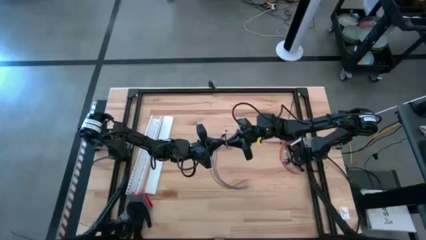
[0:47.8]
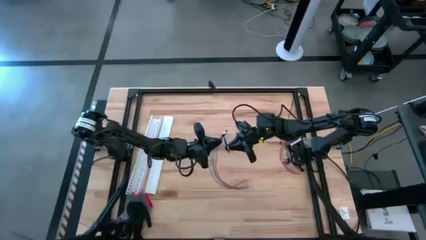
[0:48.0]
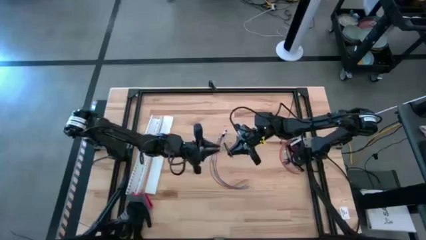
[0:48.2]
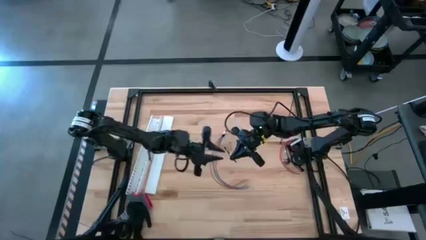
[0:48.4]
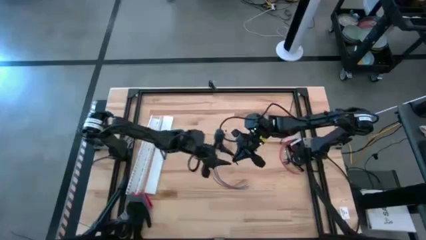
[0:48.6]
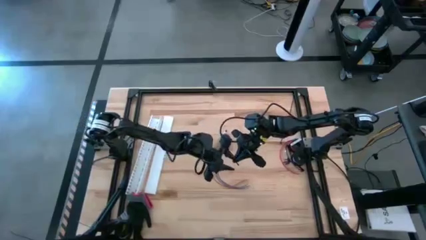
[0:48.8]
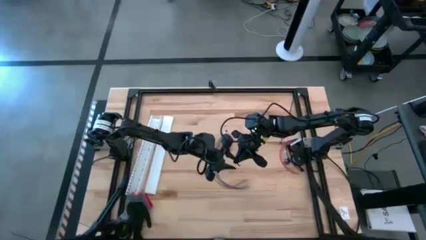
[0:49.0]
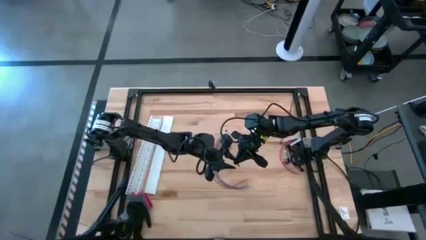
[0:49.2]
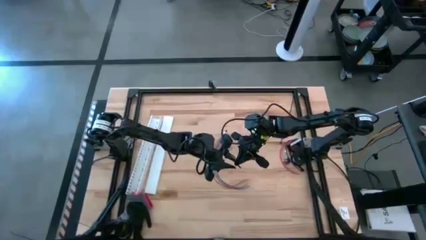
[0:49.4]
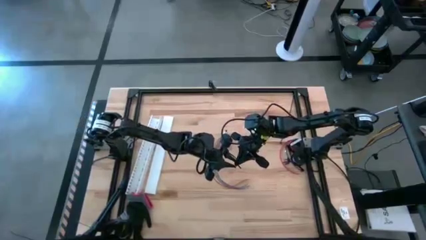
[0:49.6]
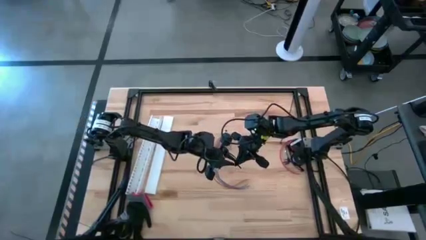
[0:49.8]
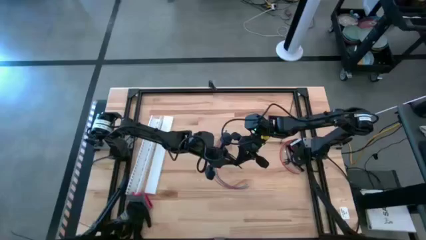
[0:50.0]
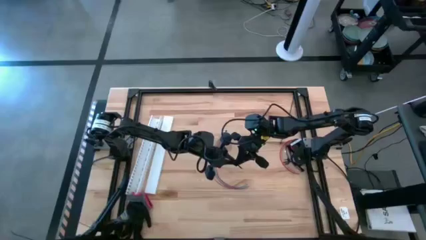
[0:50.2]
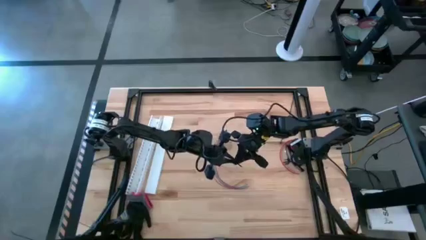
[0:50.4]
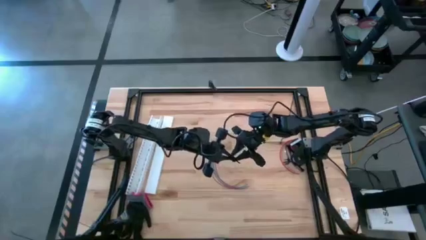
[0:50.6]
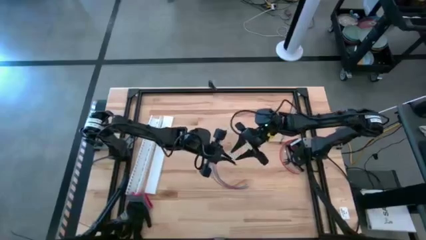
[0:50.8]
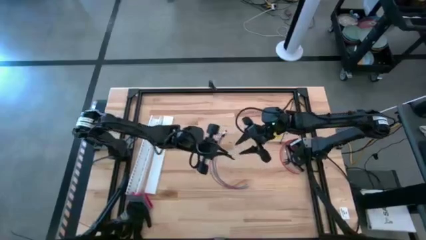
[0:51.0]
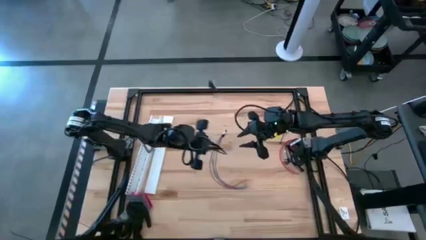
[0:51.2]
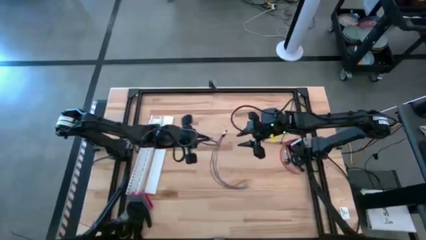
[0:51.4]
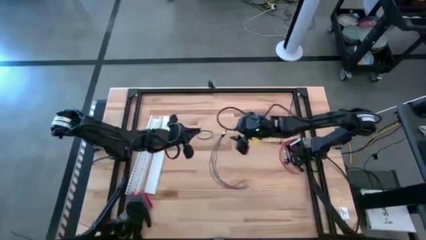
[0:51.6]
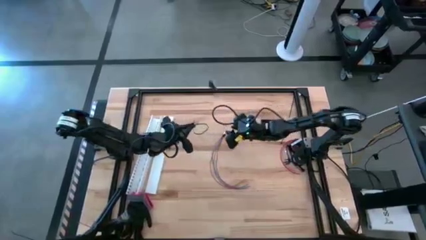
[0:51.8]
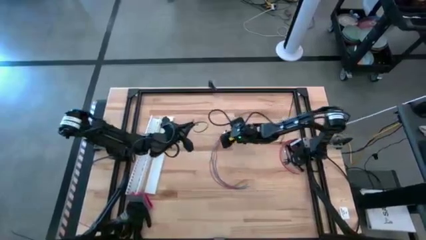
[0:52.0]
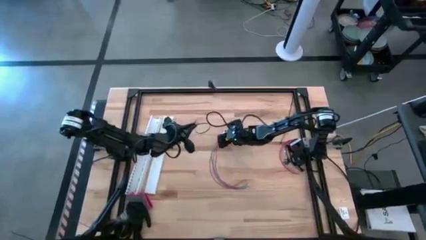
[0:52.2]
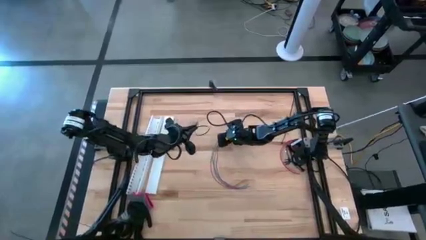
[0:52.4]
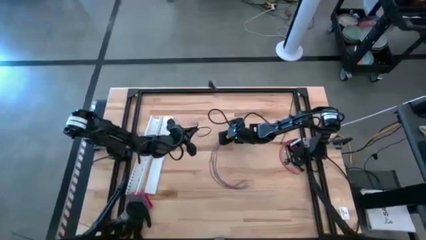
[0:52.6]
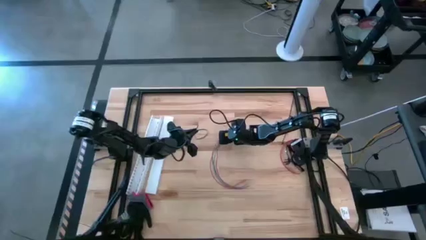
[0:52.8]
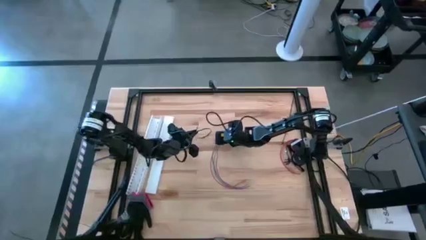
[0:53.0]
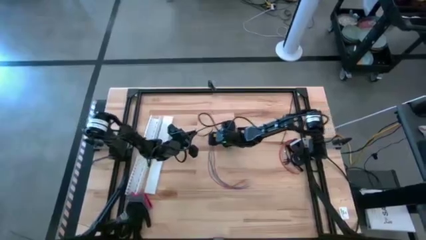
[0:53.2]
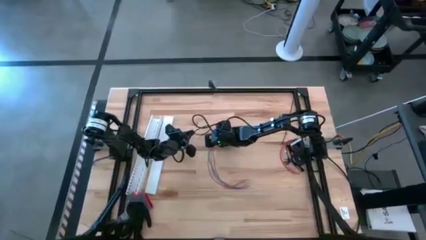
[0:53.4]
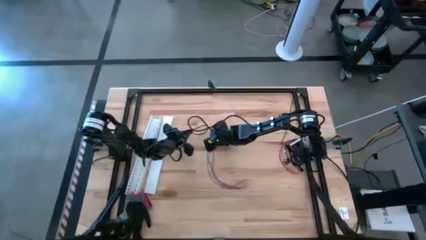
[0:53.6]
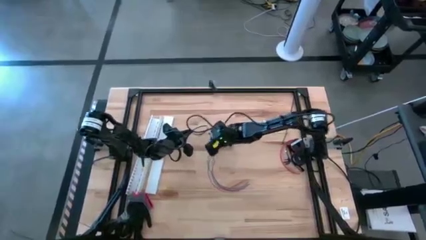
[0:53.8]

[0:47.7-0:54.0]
Task: Ziptie cables
Wrap the cable wires using bottom black ziptie

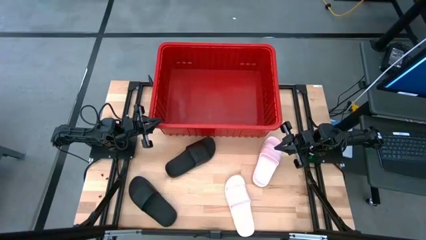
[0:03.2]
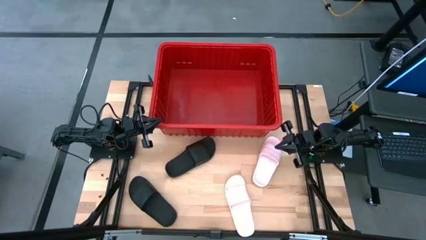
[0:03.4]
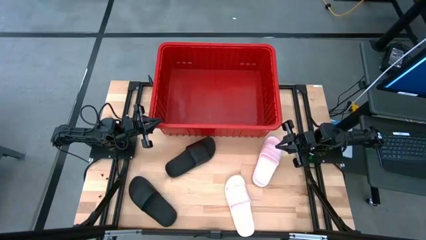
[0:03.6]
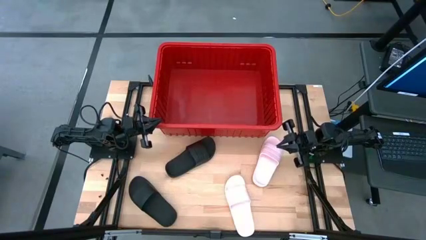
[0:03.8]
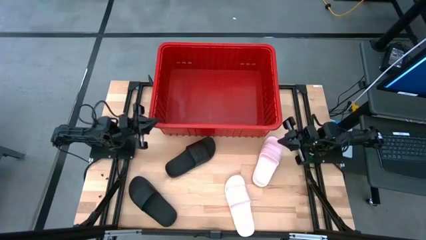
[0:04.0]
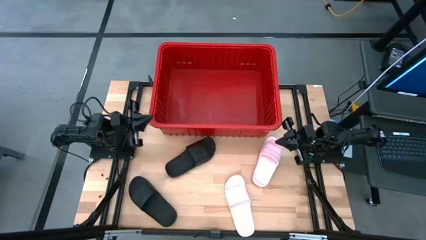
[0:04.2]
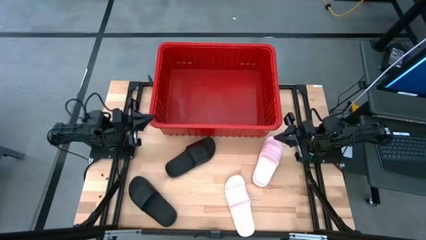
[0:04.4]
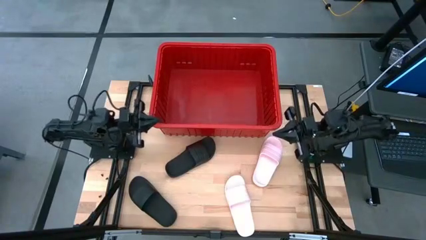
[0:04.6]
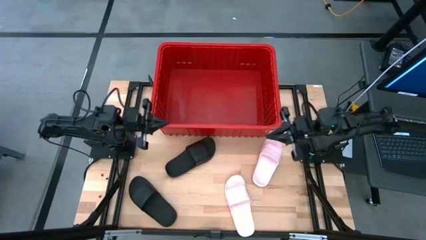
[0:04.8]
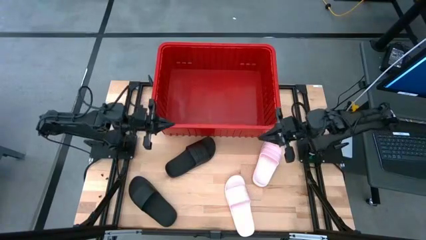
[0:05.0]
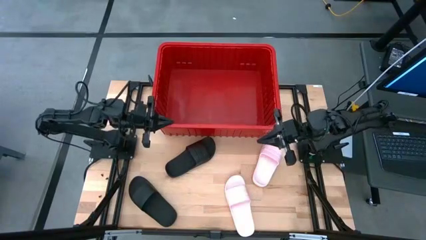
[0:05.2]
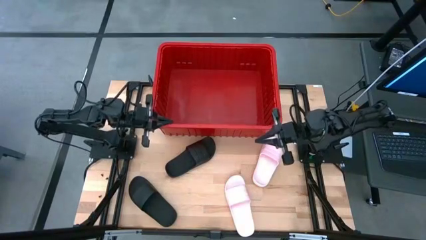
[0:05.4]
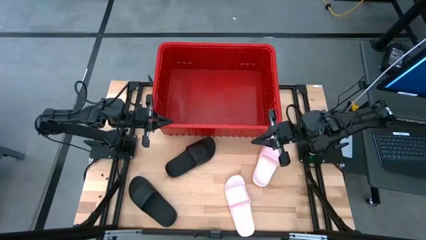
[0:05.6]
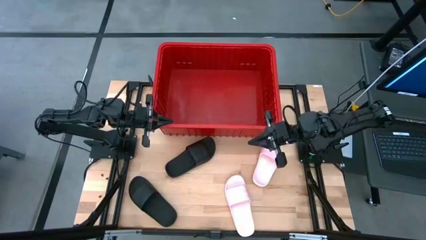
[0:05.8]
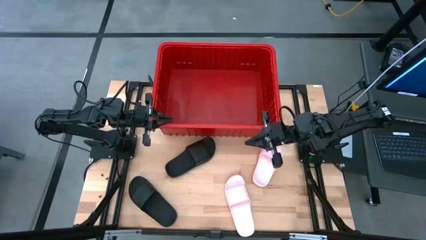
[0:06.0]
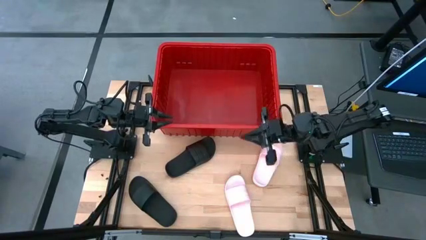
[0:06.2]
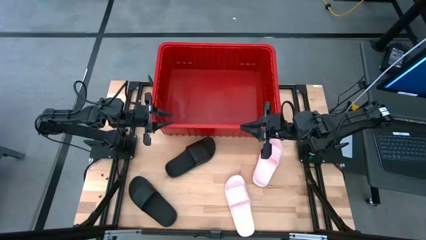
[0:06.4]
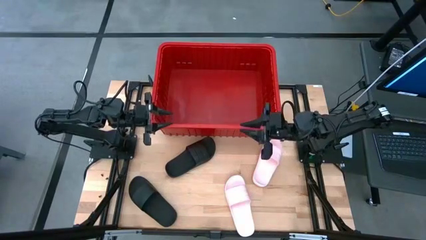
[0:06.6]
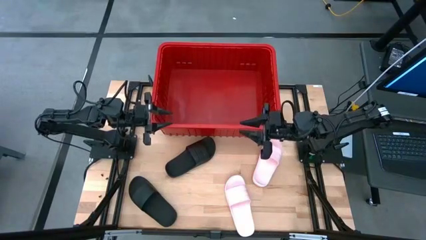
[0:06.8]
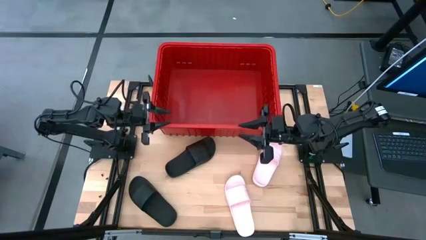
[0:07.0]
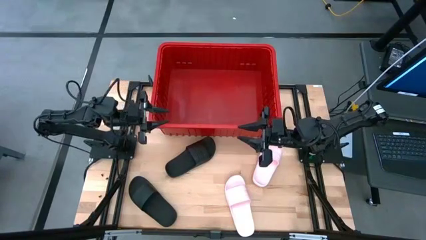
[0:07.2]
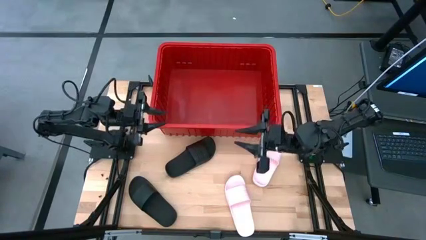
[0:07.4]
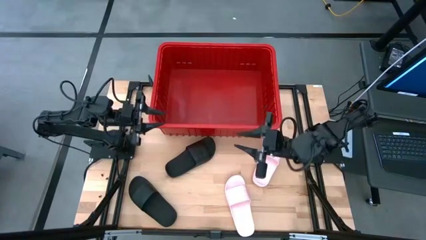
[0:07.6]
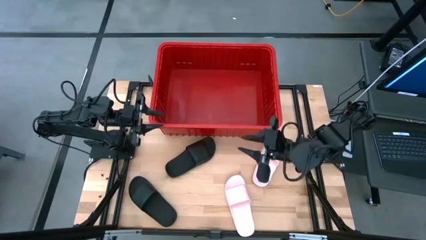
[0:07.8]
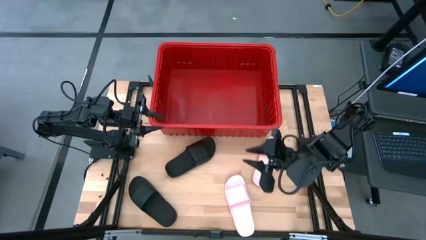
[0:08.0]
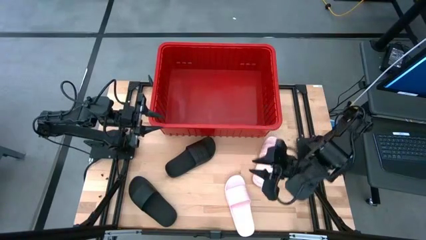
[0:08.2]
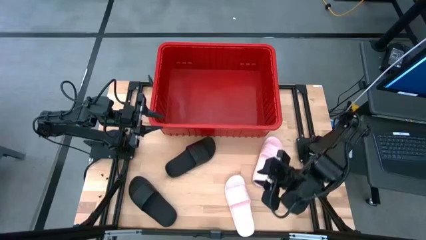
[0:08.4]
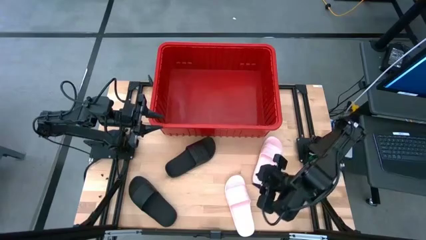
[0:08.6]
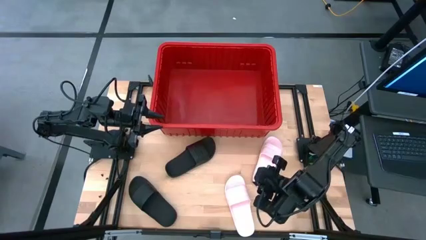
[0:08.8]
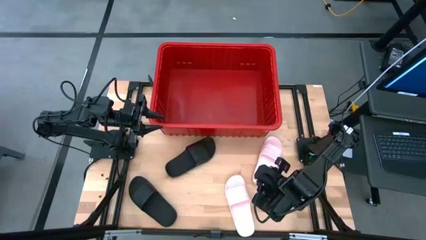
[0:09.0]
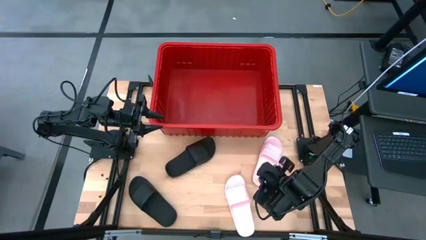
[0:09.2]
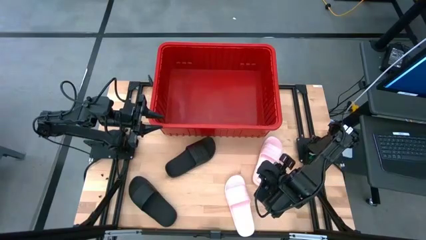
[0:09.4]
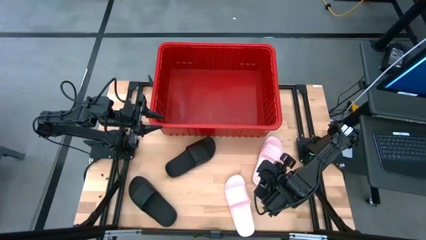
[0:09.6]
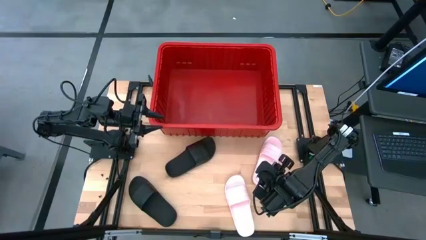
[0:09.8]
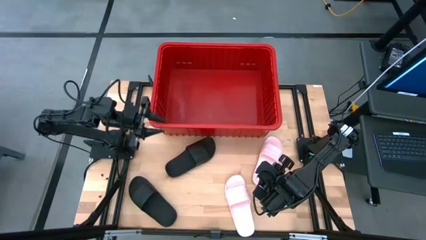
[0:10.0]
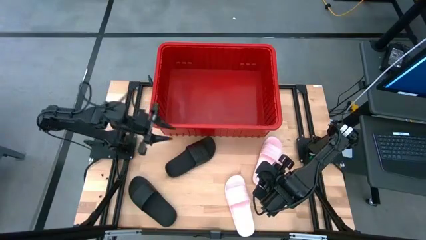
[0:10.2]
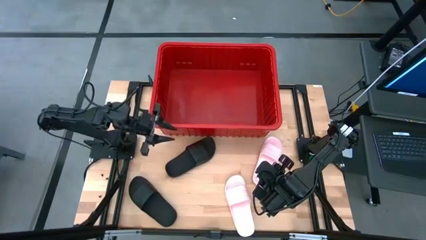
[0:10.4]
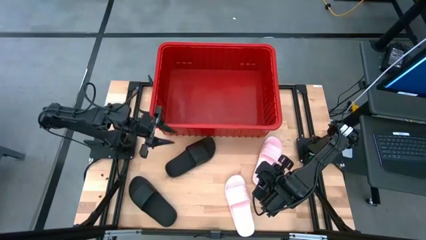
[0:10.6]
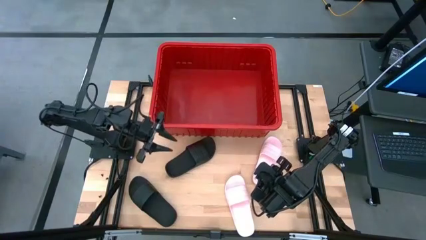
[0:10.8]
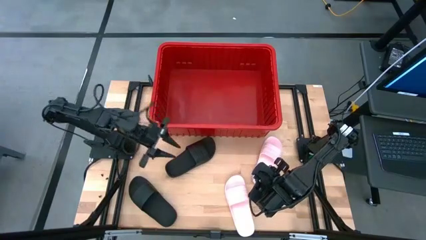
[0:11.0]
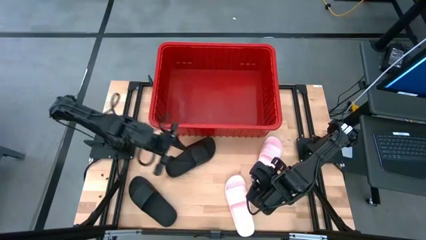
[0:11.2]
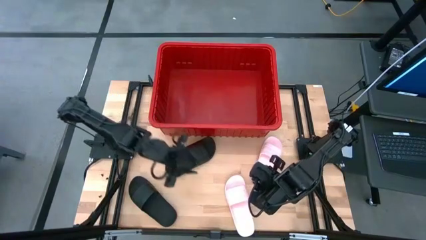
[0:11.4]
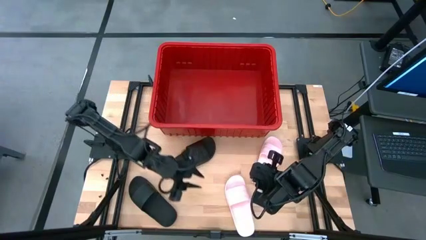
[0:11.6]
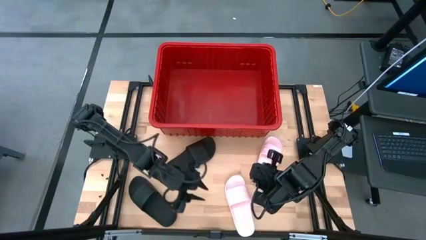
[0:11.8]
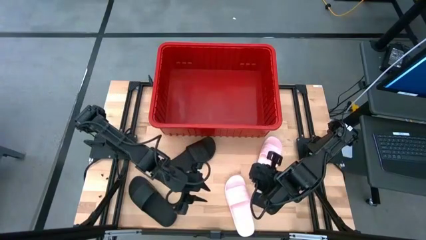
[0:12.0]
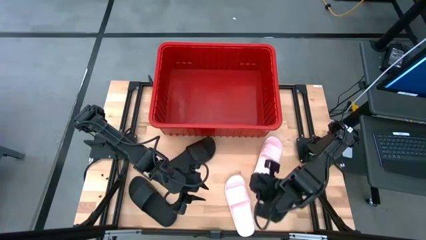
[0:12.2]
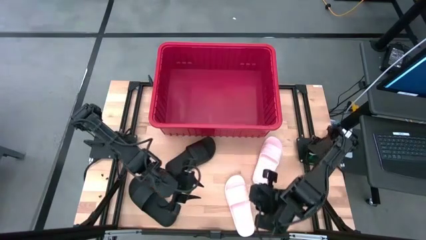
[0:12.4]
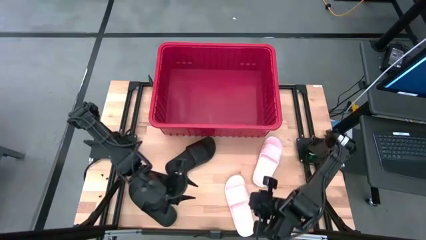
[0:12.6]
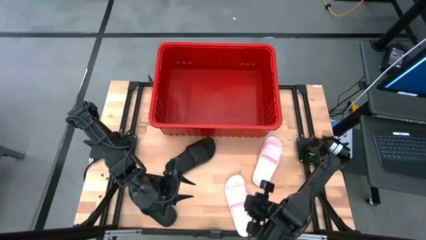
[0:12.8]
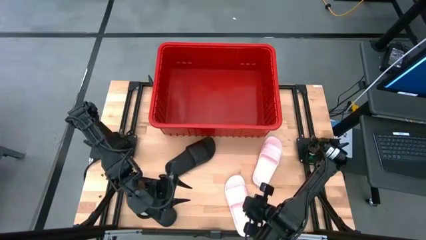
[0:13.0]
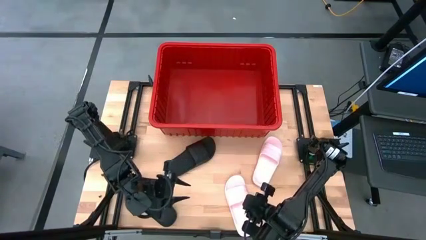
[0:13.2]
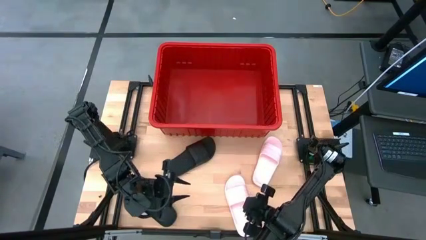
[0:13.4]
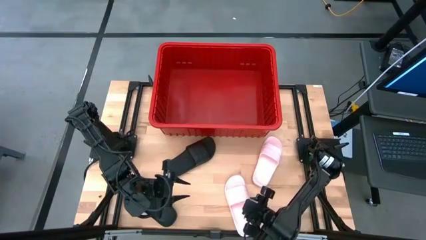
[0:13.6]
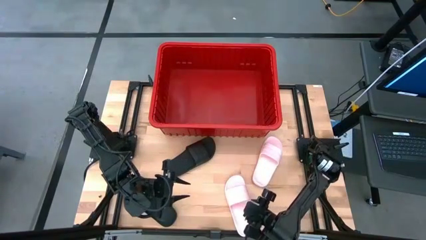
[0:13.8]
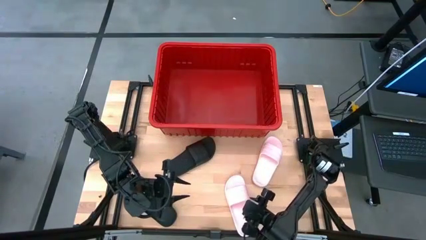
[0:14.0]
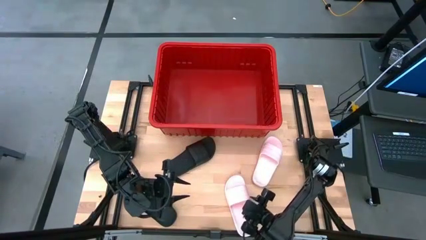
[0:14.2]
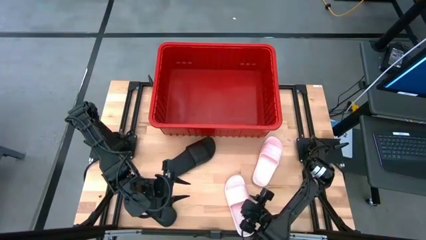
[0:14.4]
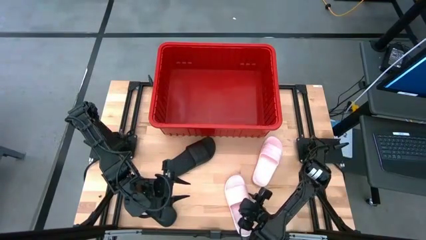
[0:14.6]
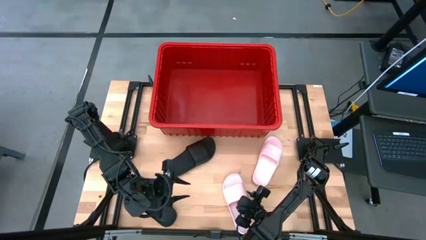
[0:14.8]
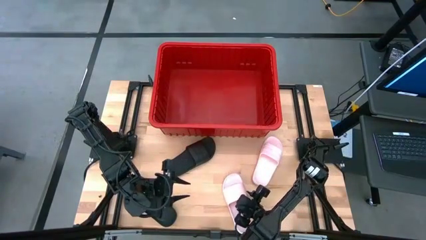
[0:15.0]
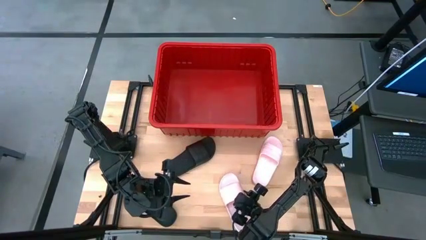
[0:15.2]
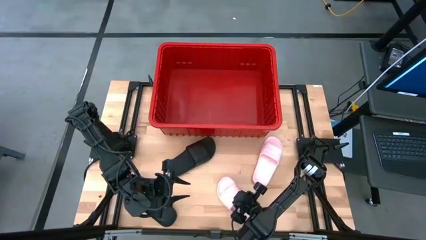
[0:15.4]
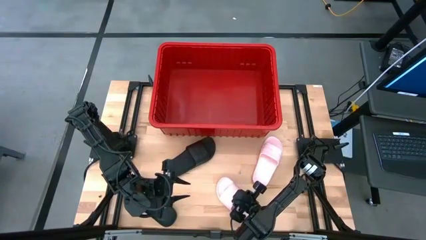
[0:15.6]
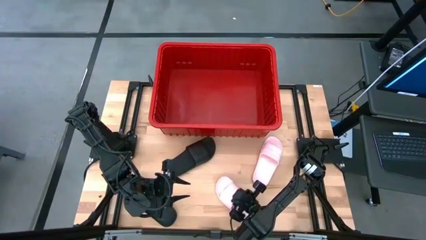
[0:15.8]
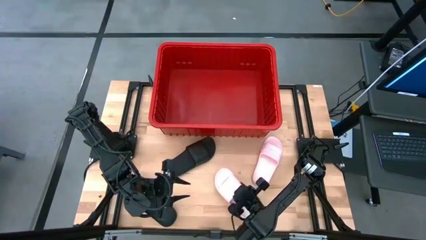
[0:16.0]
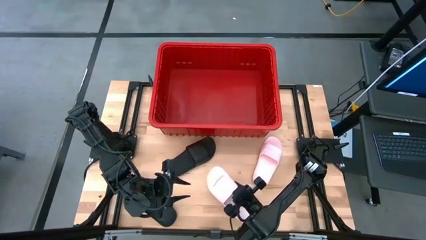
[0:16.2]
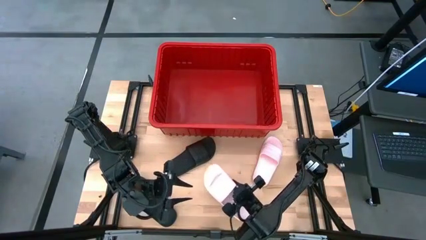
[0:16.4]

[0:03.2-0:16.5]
Task: Pick and place slides into bin
Put the bottom pink slide into the red bin
